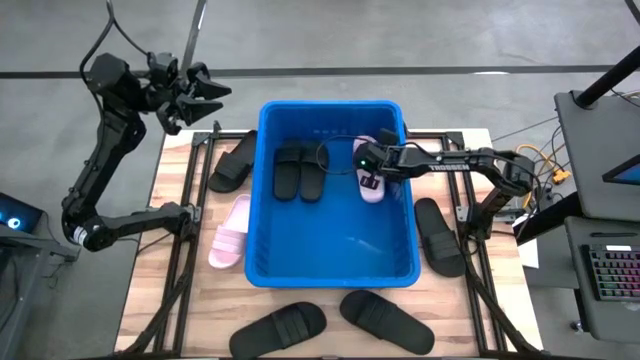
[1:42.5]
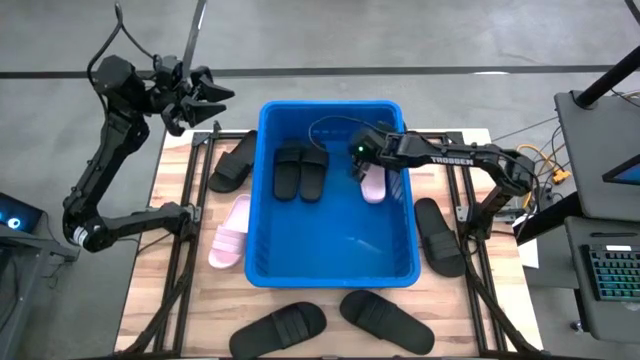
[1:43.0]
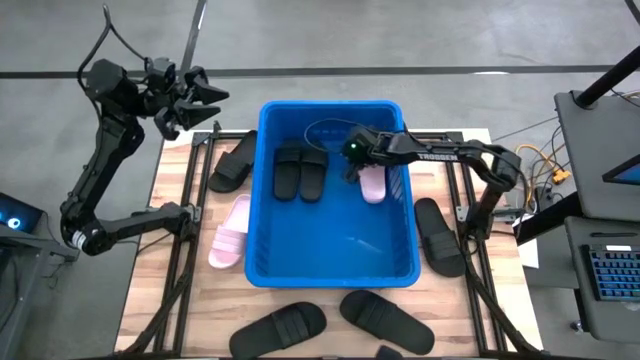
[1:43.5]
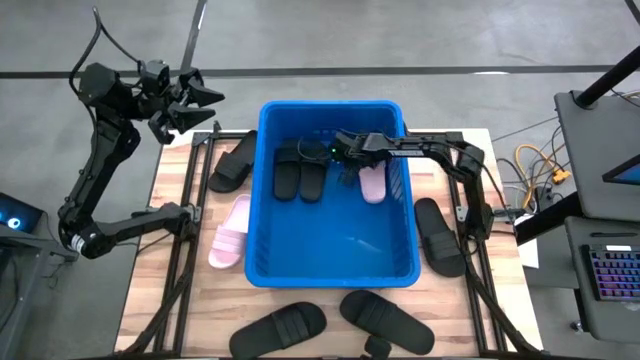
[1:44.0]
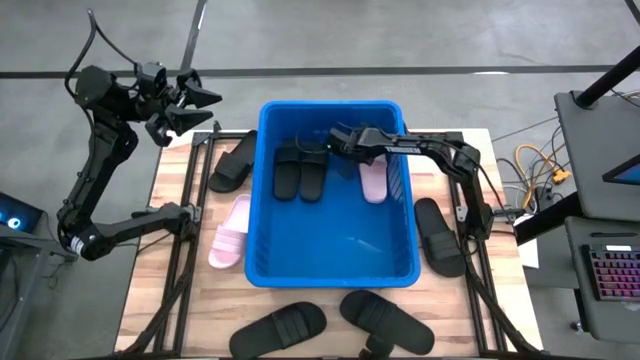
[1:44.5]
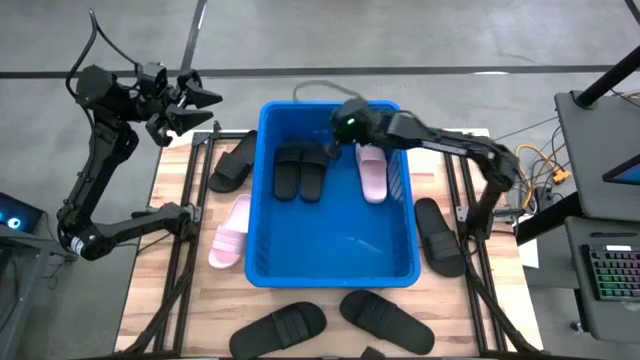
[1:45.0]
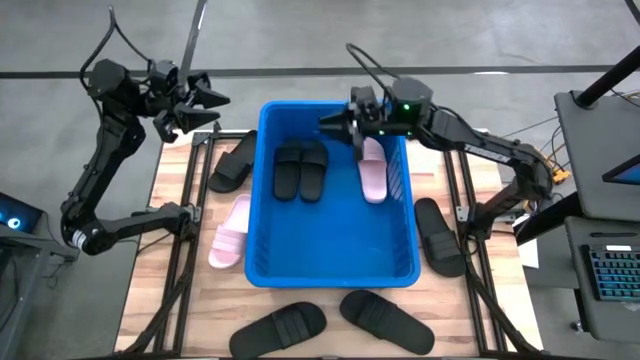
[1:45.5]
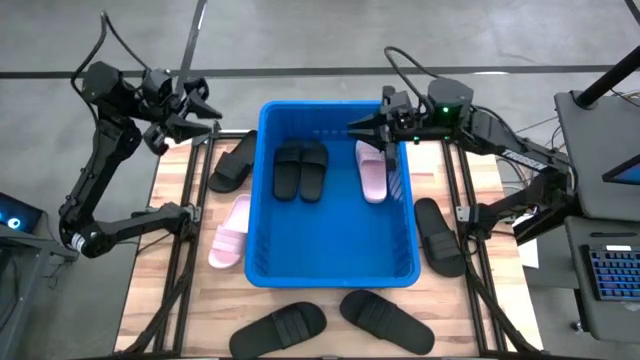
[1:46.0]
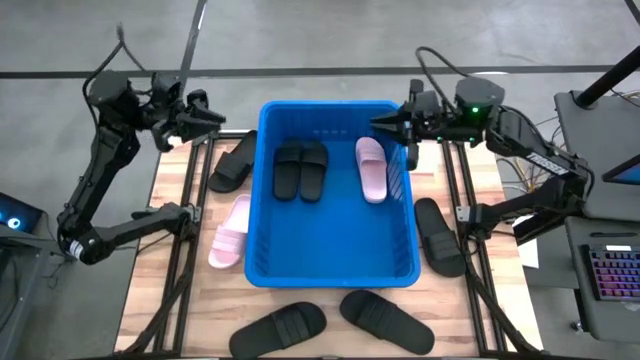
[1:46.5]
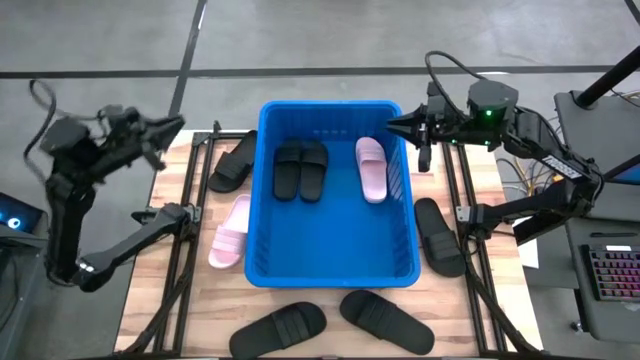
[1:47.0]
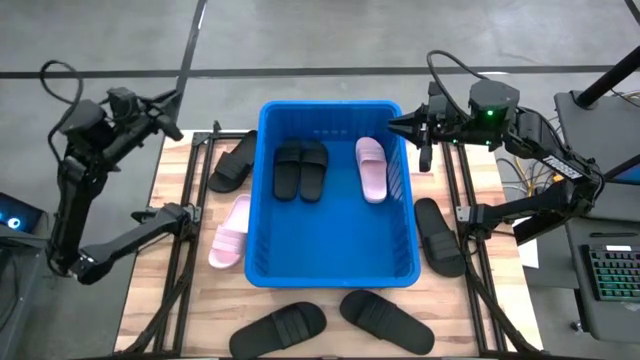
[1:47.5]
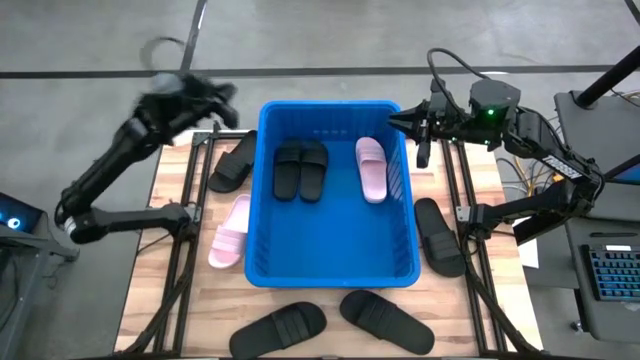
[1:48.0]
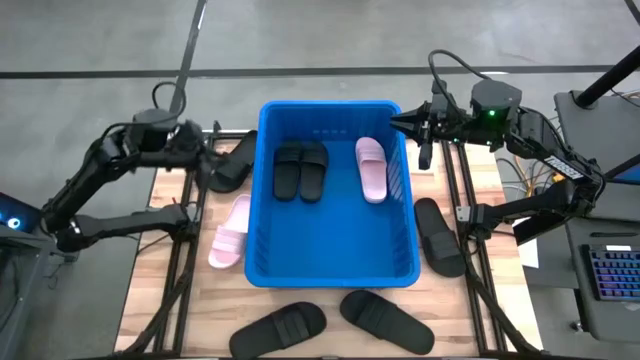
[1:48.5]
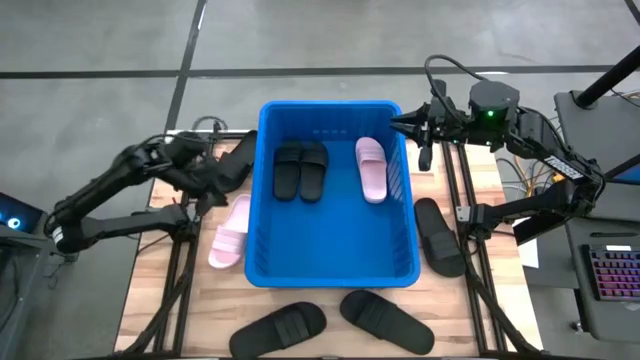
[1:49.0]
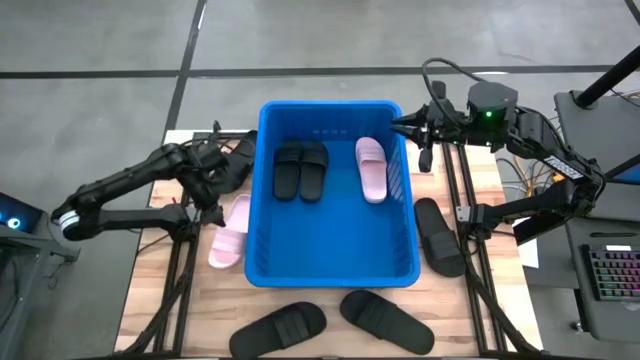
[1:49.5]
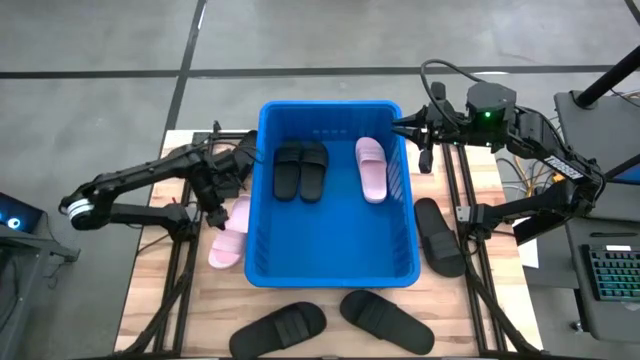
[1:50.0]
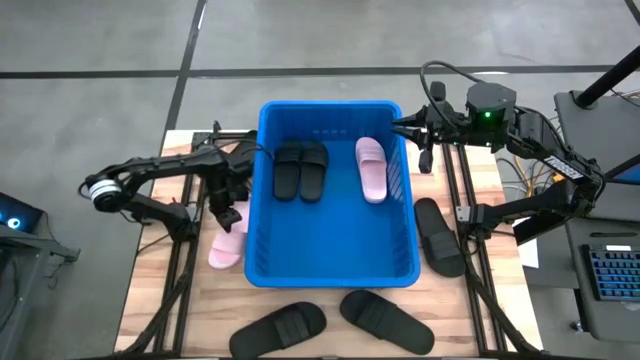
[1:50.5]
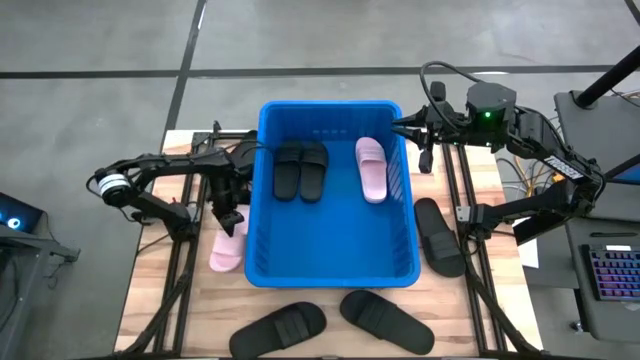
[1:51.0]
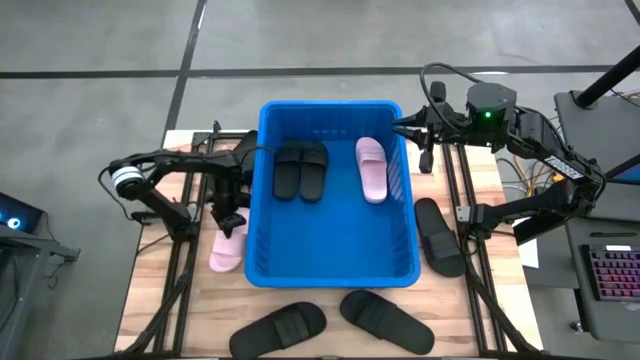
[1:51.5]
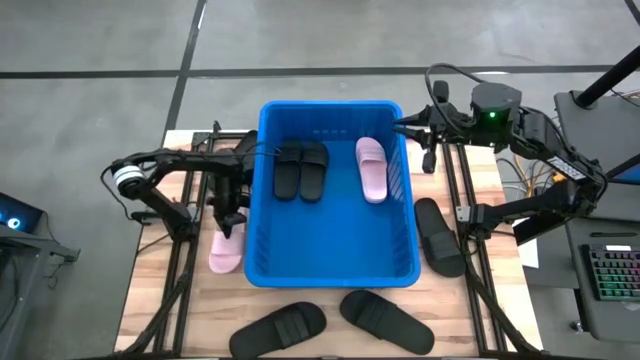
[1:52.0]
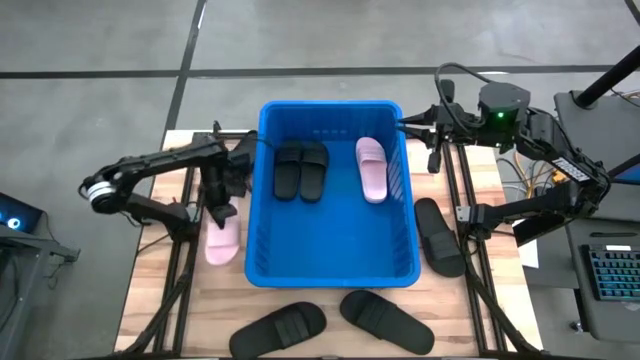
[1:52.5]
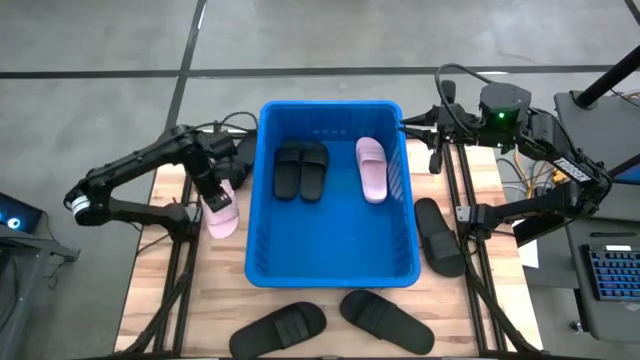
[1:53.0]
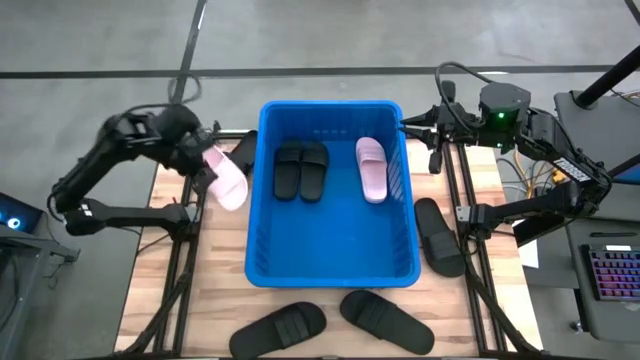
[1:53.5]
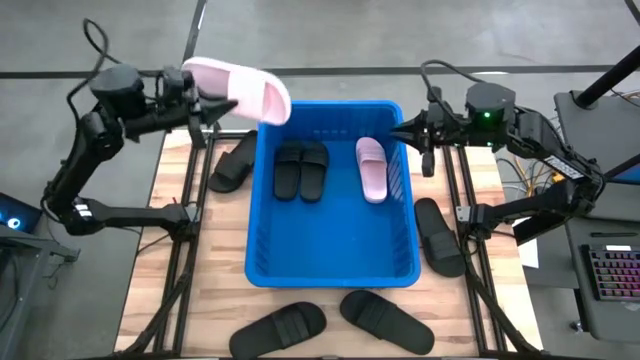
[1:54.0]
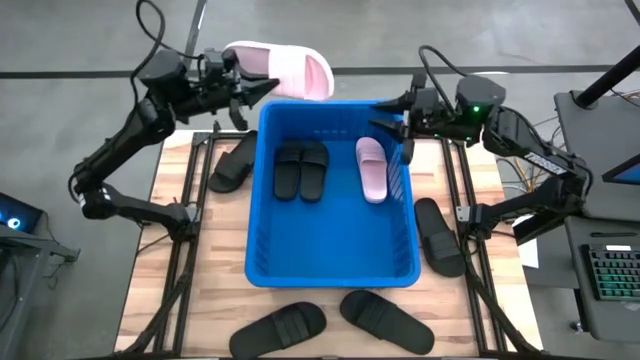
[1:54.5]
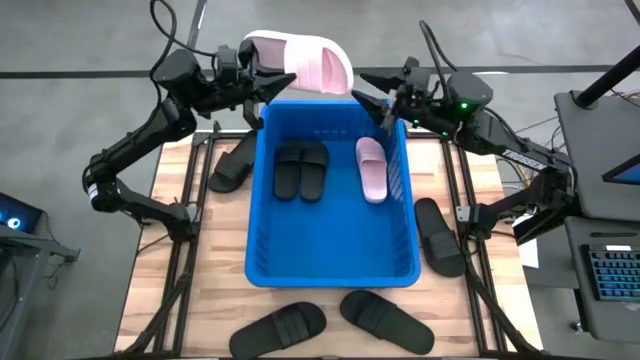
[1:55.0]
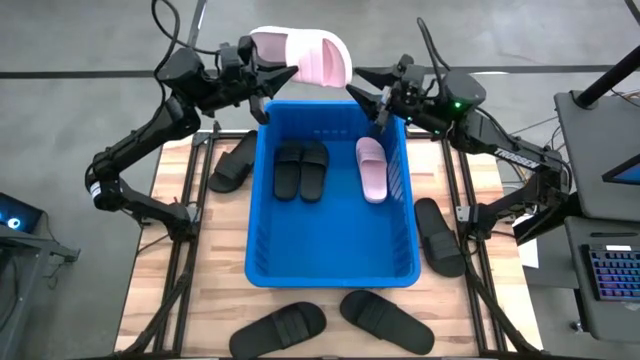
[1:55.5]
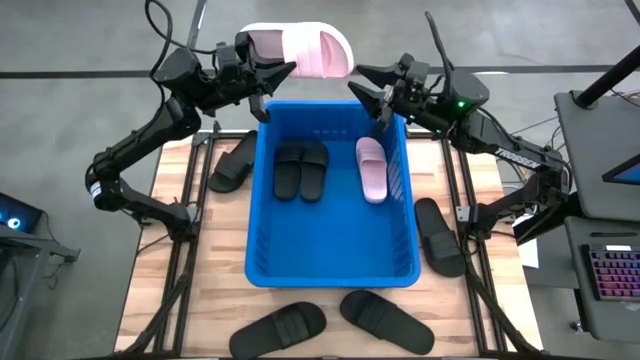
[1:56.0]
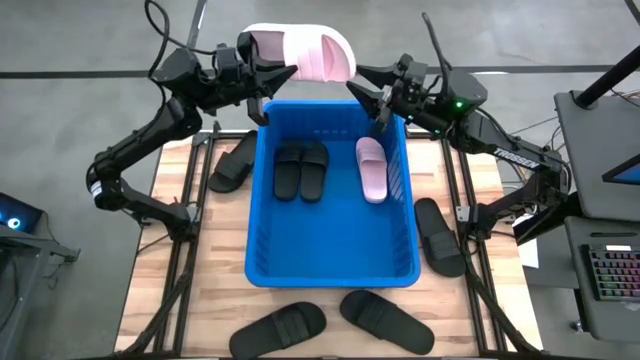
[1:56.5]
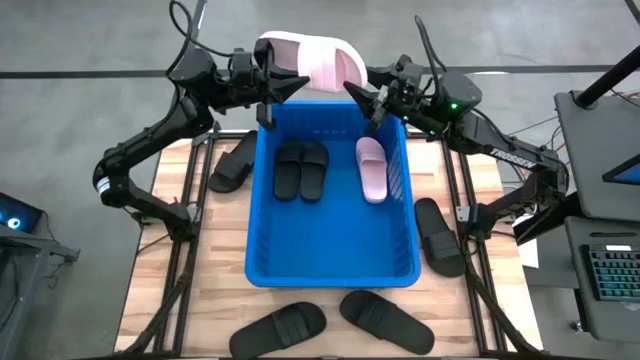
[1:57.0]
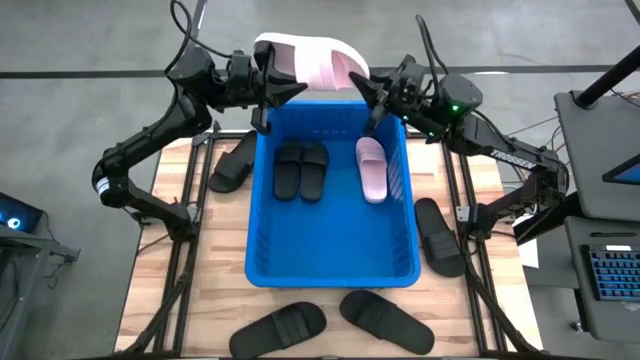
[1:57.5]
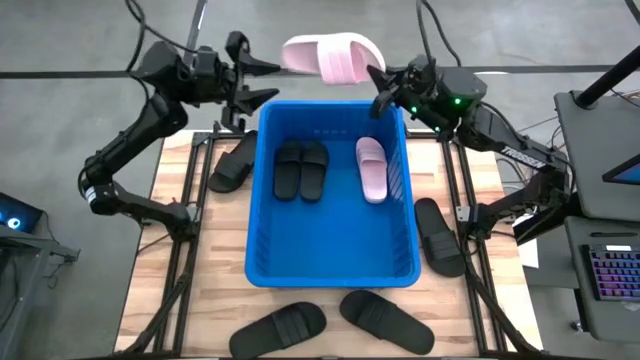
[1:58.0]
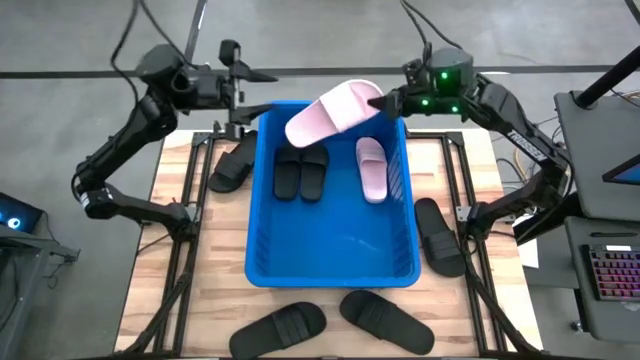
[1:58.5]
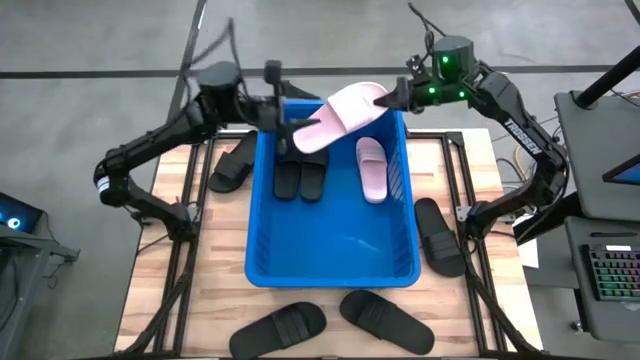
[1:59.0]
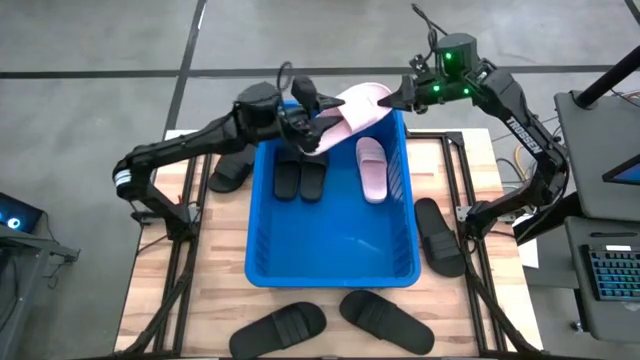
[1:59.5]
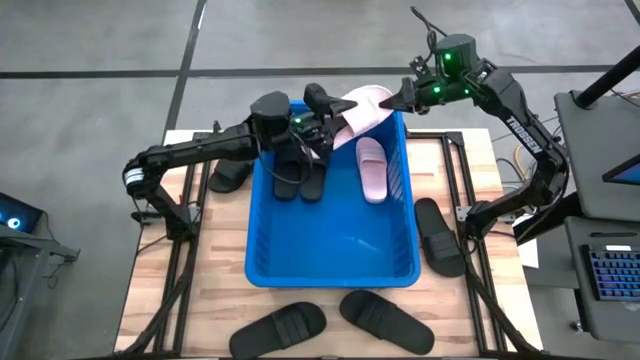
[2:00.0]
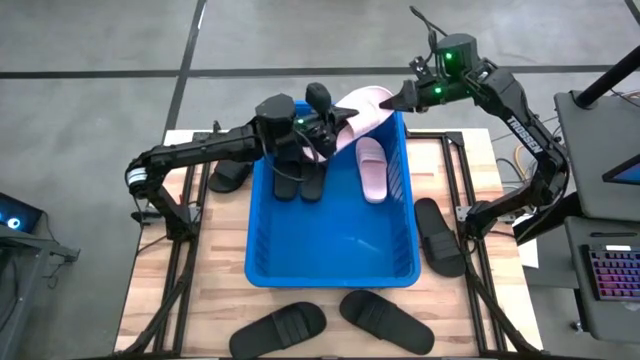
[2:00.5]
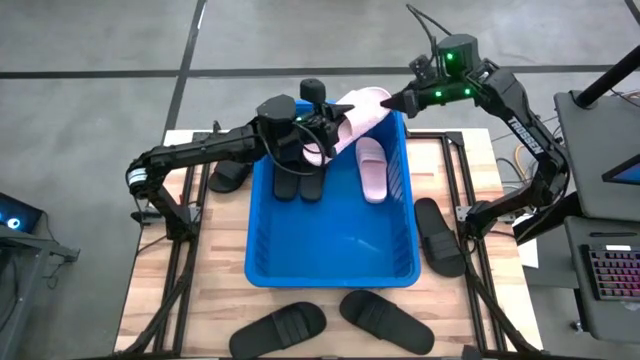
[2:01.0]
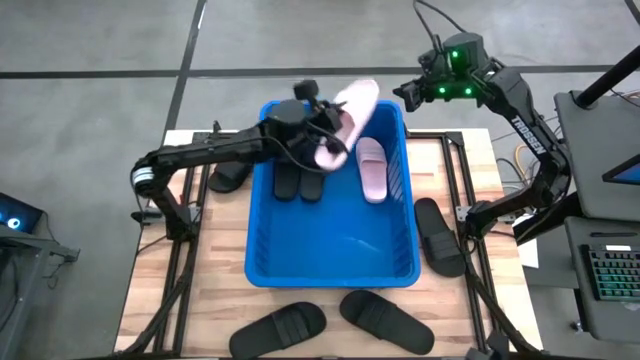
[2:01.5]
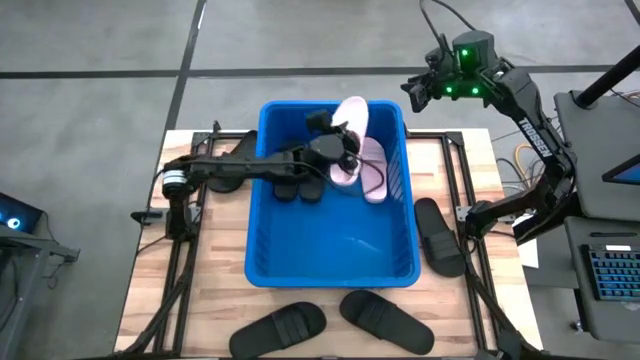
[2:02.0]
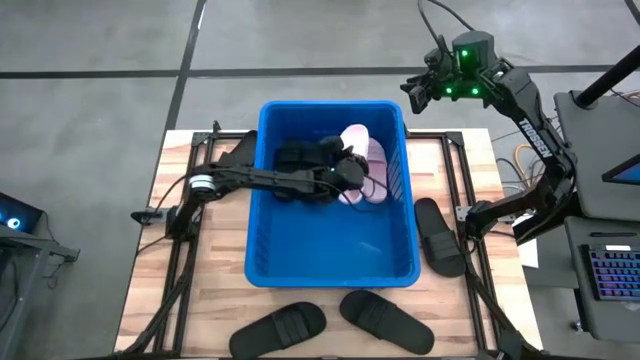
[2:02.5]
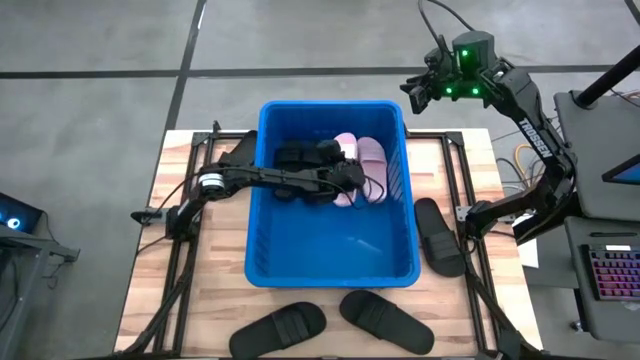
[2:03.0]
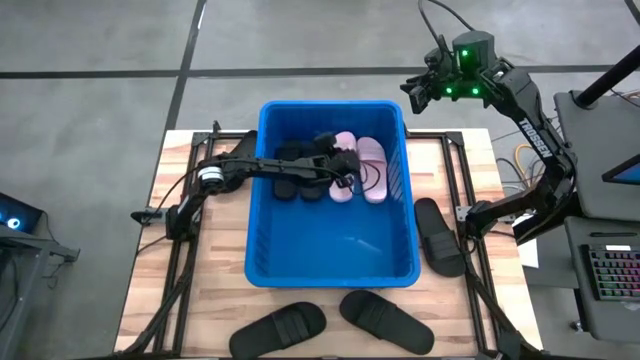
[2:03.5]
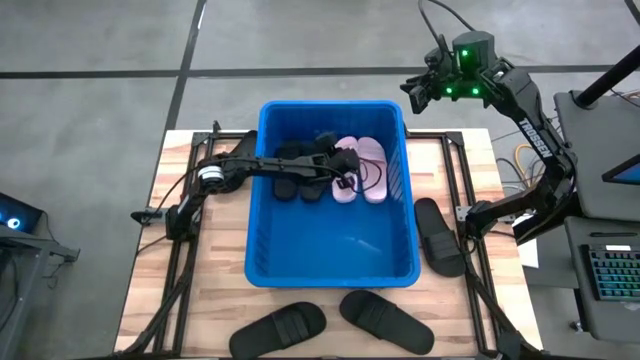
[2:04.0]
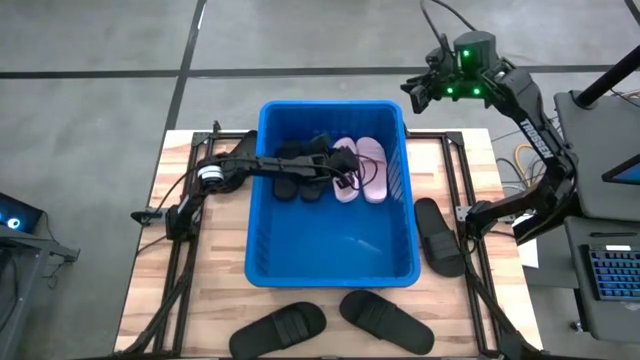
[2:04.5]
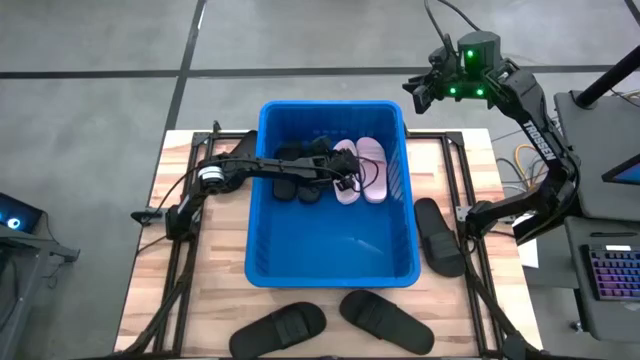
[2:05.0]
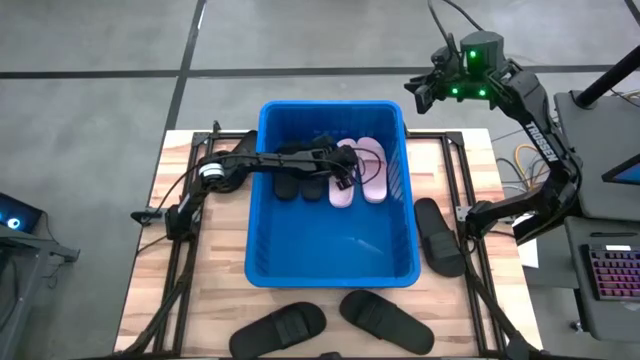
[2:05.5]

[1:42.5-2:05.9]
Task: Pick and place slides into bin
Put the pink slide into the blue bin
